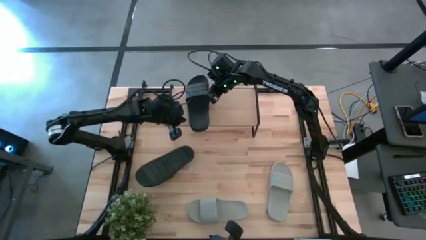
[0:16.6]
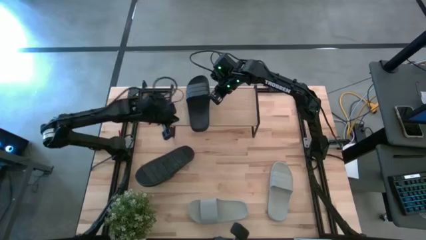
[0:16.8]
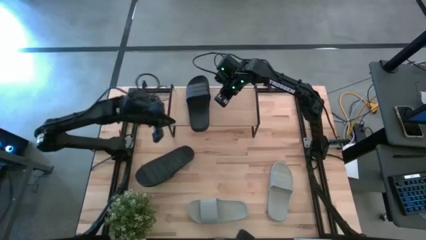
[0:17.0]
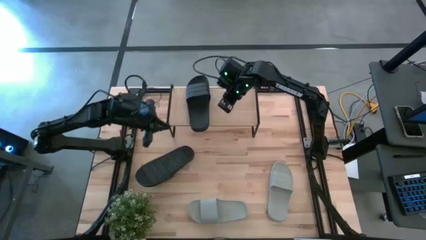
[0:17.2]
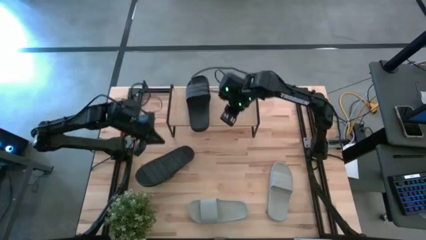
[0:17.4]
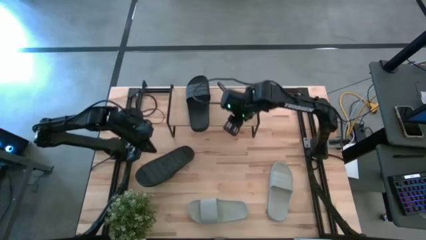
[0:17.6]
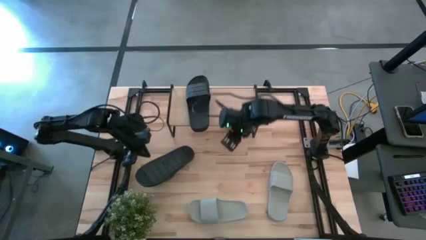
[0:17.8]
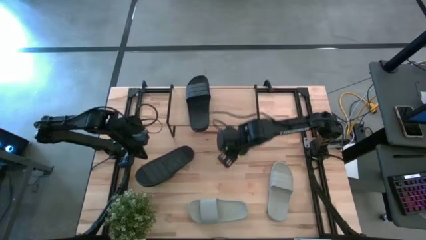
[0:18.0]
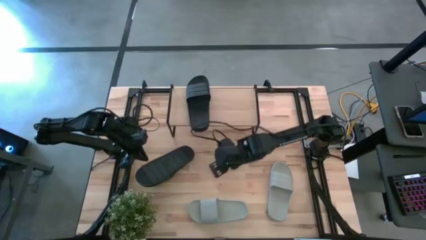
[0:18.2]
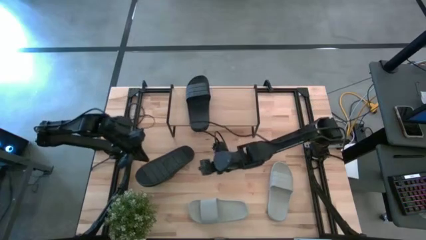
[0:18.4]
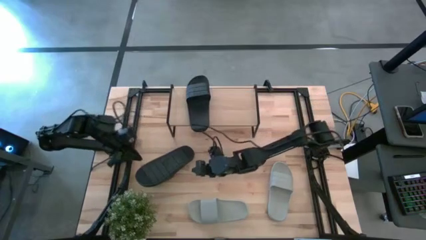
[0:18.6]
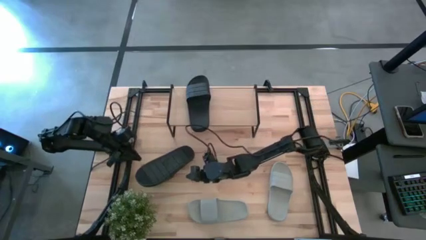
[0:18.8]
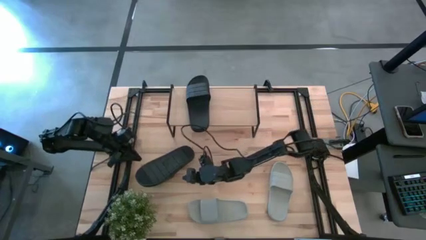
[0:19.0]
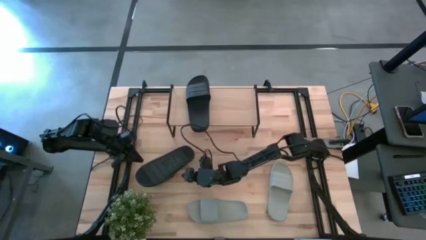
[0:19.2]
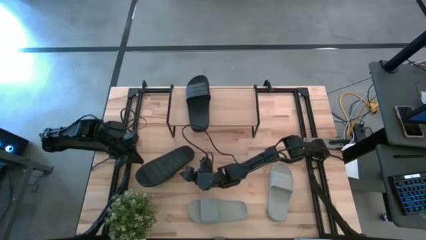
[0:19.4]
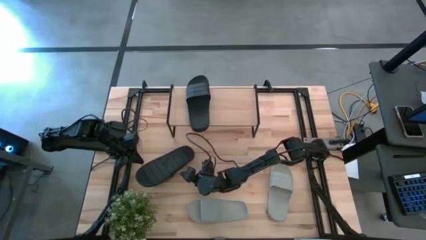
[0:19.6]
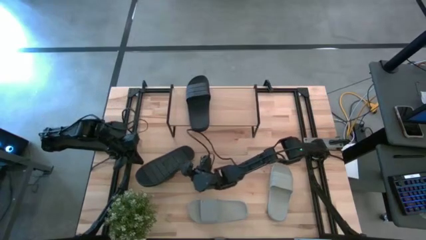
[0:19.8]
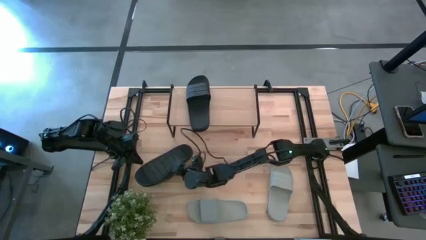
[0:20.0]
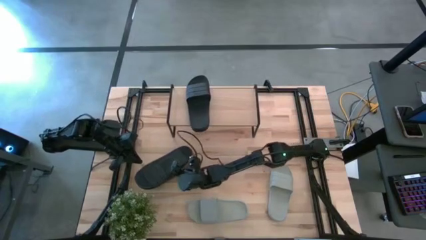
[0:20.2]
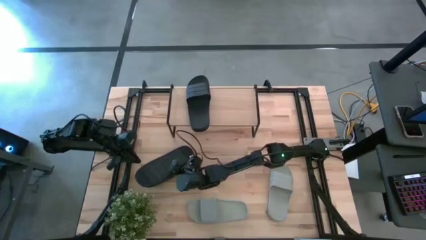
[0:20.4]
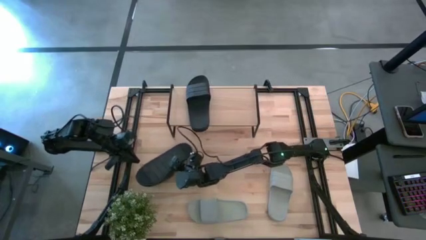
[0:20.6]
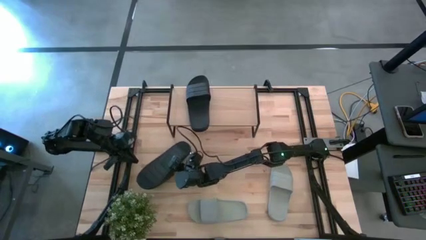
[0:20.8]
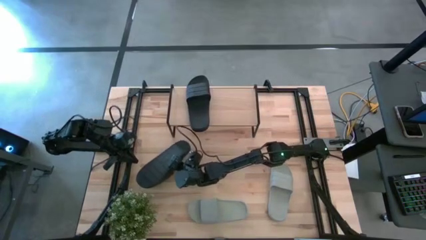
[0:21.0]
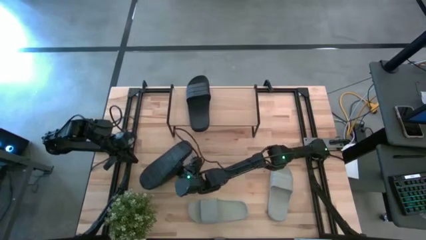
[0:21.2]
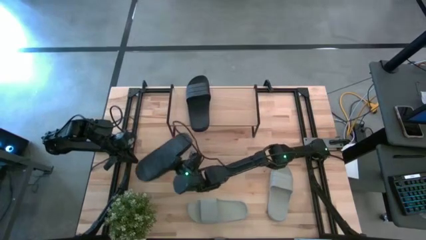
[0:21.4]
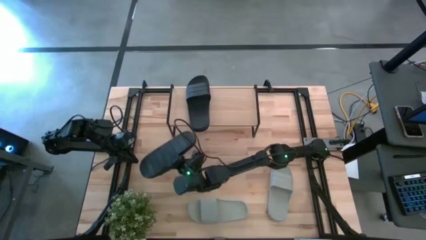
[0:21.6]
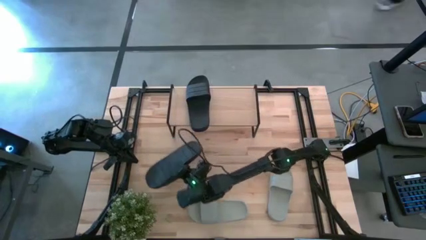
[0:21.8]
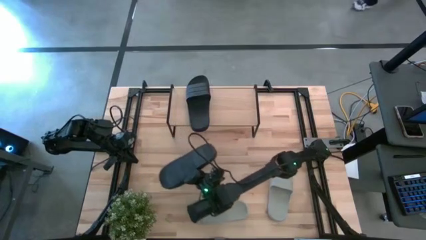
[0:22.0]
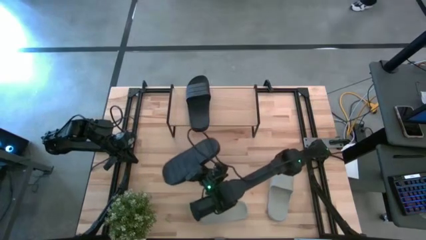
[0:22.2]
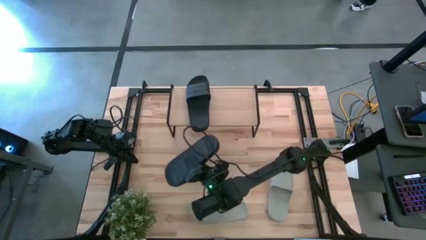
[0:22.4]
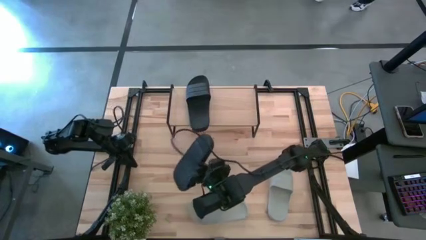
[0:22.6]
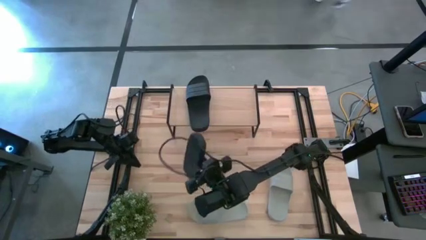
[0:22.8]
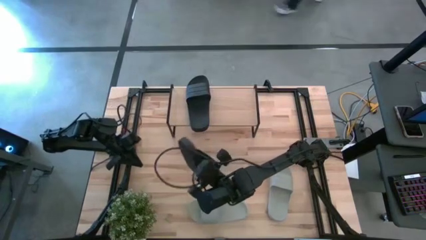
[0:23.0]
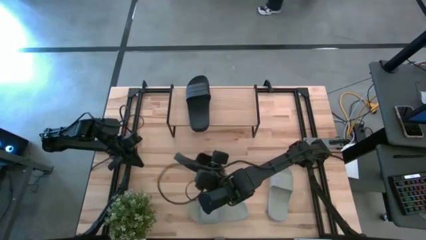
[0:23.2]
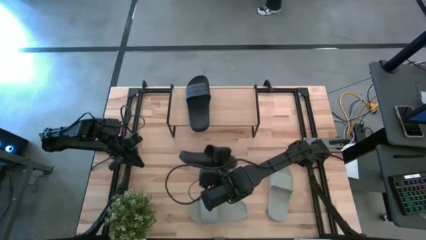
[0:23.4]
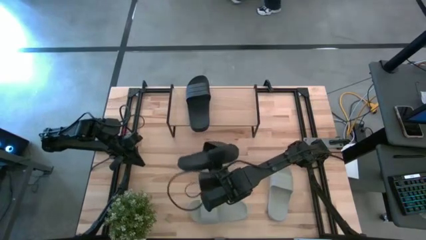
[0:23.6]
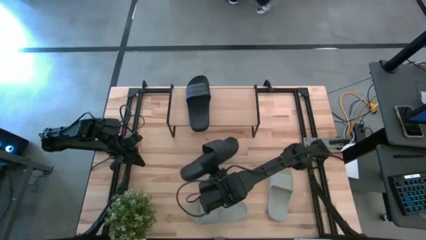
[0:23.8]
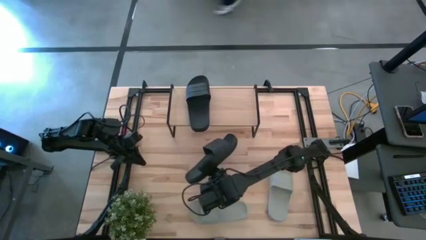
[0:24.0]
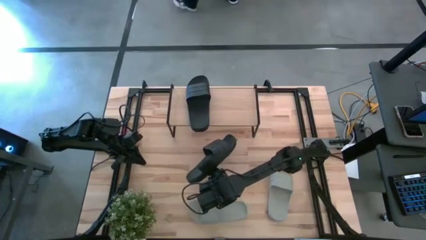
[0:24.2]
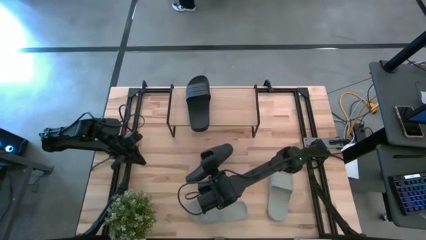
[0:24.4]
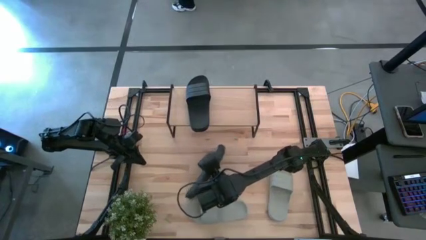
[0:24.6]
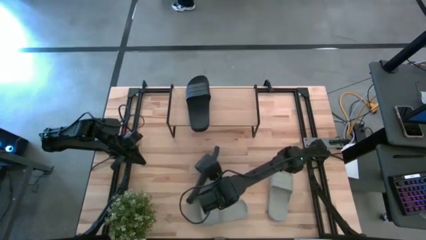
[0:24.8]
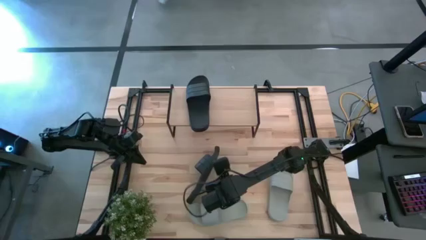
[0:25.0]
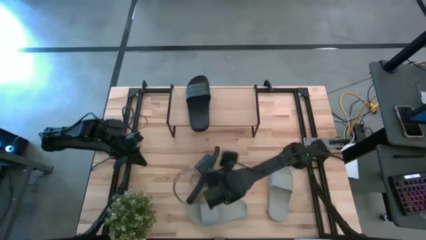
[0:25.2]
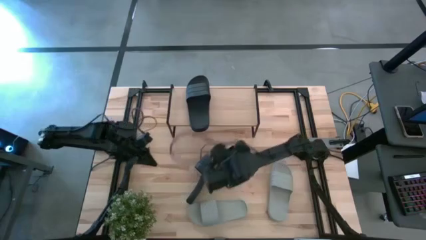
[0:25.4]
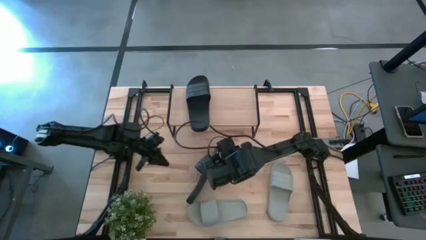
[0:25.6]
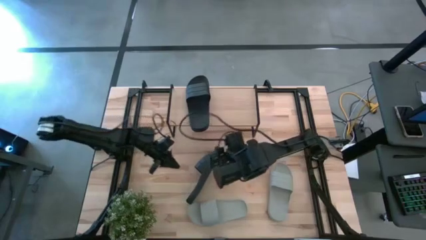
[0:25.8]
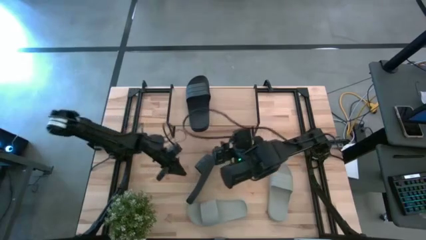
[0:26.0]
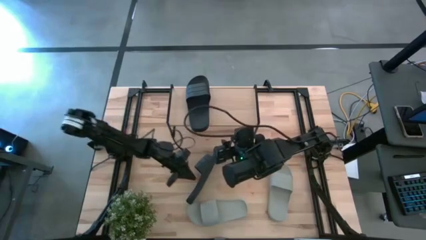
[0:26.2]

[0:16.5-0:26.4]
Task: Pick and place slides into the shelf
Put the black slide on the shelf
